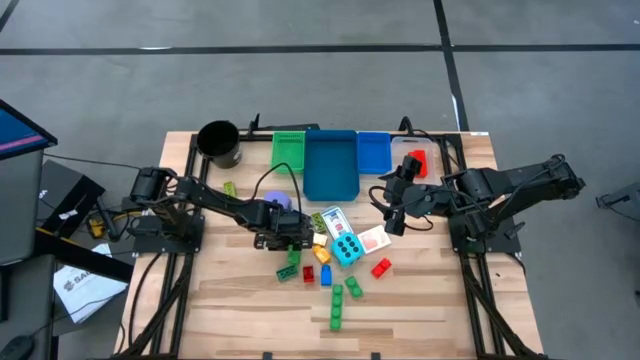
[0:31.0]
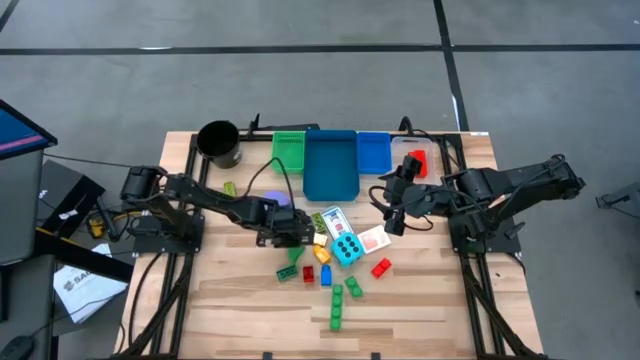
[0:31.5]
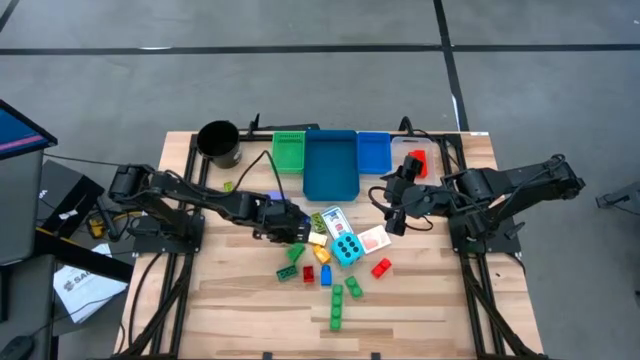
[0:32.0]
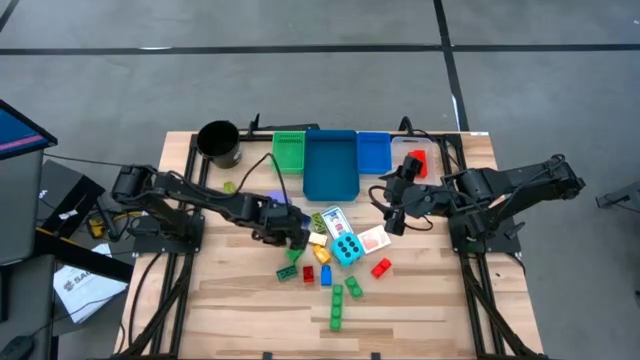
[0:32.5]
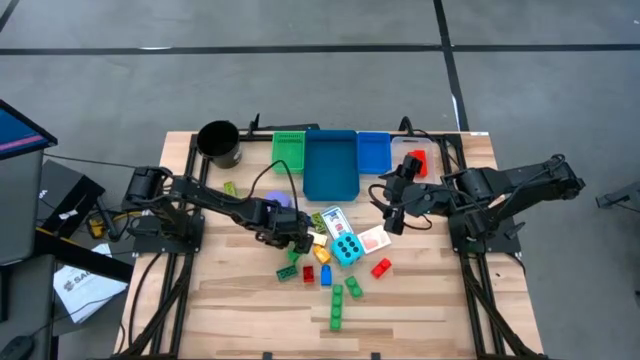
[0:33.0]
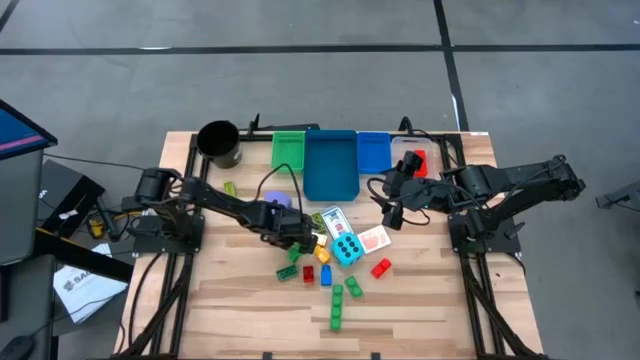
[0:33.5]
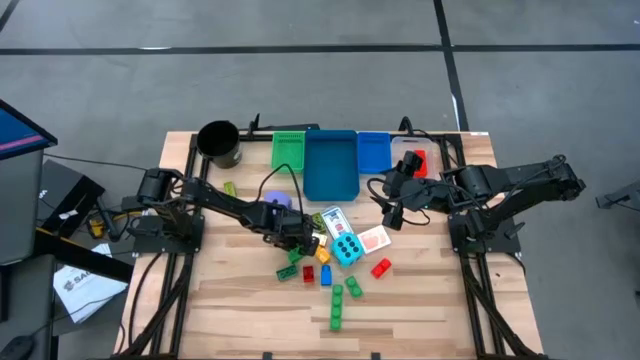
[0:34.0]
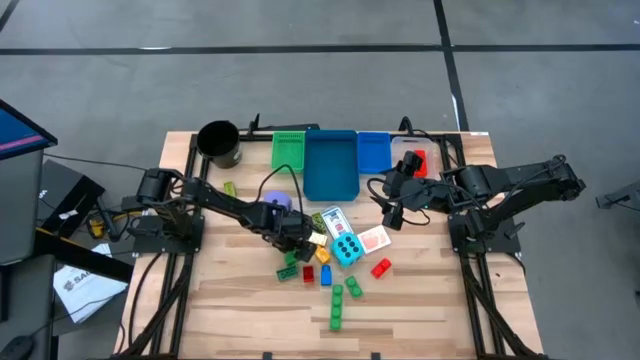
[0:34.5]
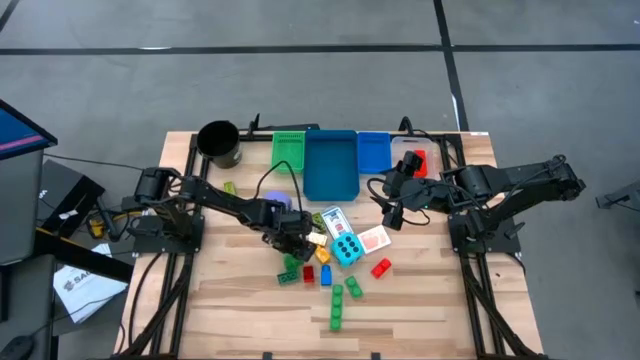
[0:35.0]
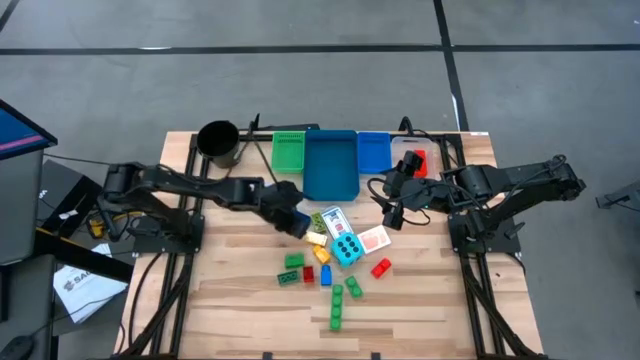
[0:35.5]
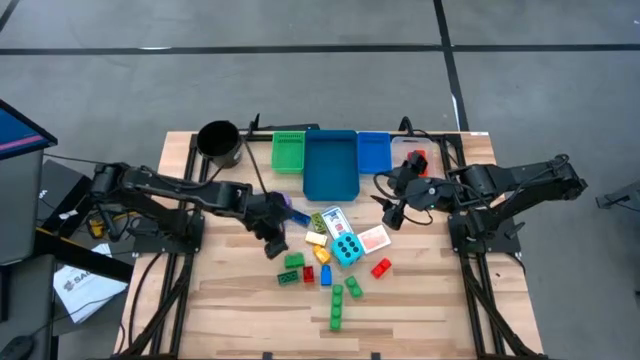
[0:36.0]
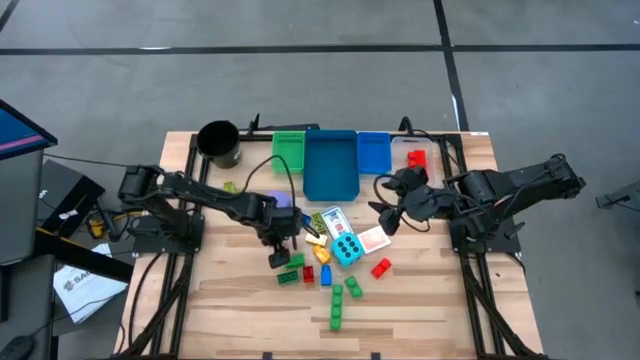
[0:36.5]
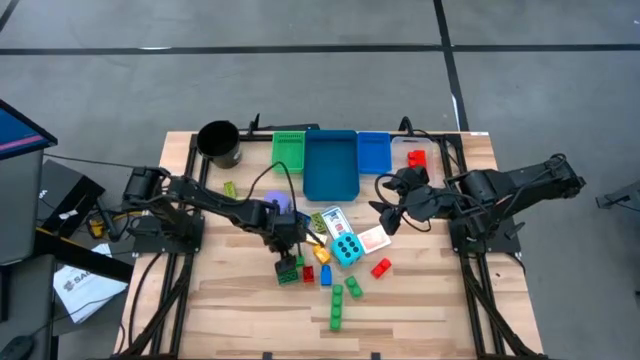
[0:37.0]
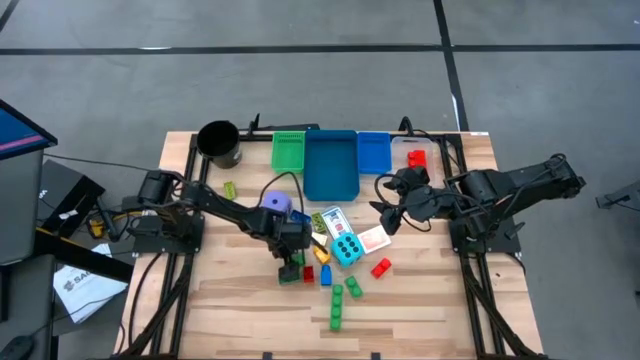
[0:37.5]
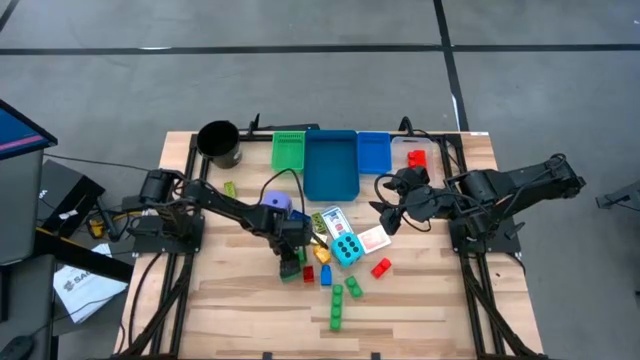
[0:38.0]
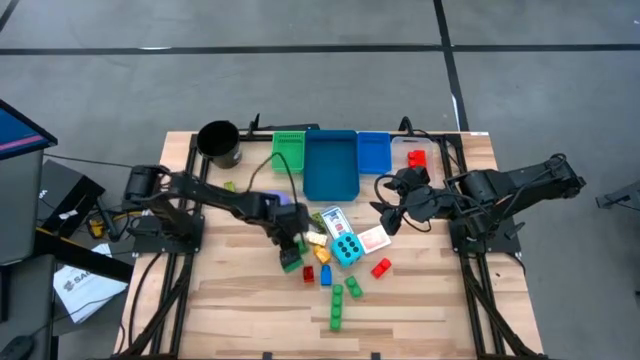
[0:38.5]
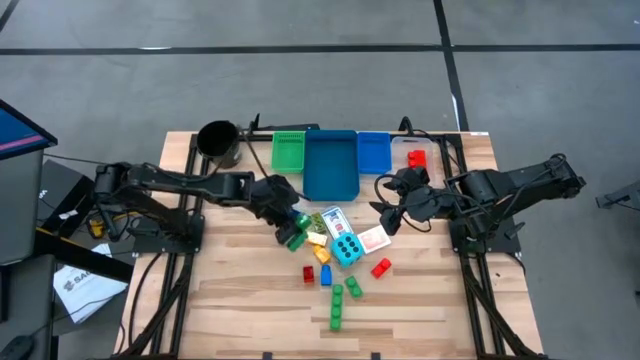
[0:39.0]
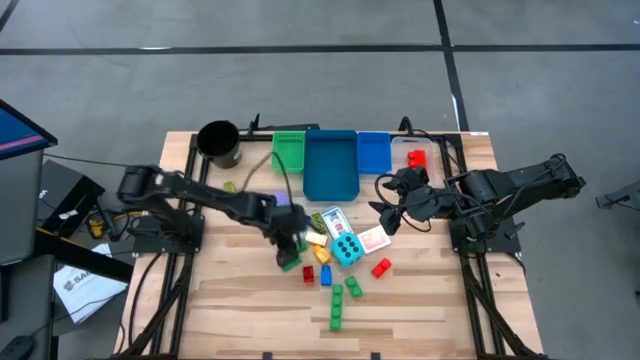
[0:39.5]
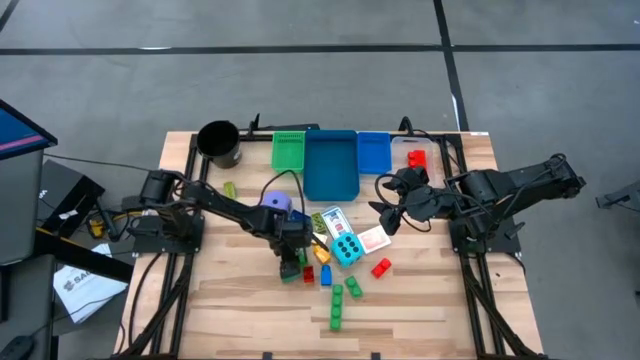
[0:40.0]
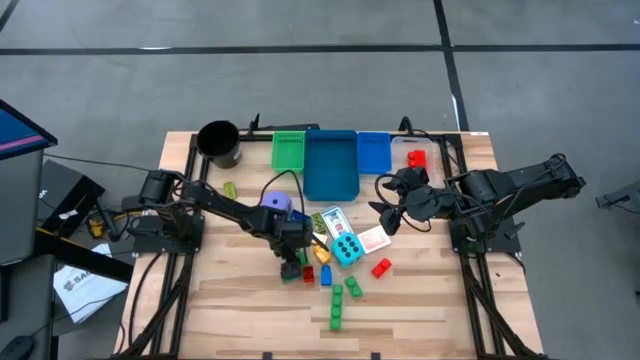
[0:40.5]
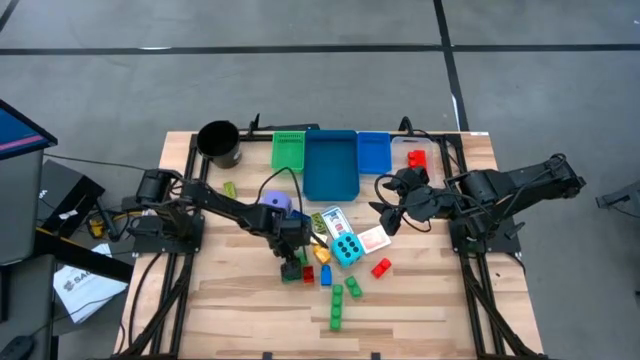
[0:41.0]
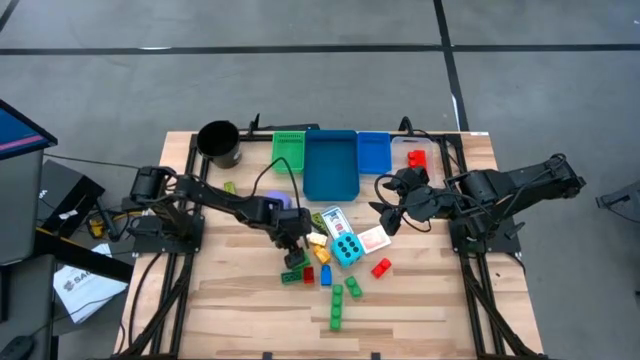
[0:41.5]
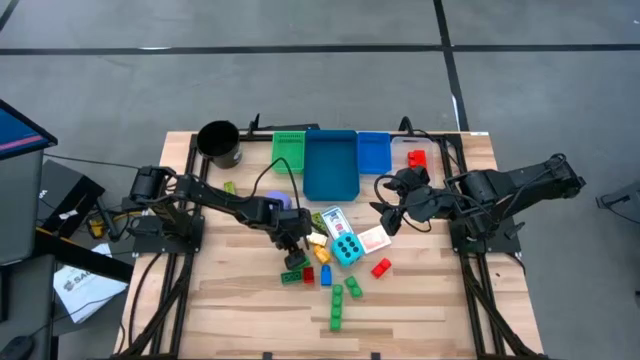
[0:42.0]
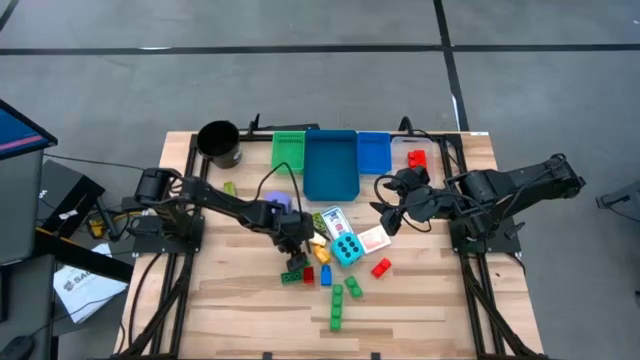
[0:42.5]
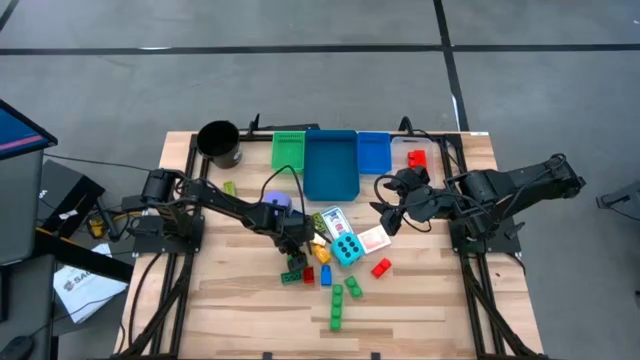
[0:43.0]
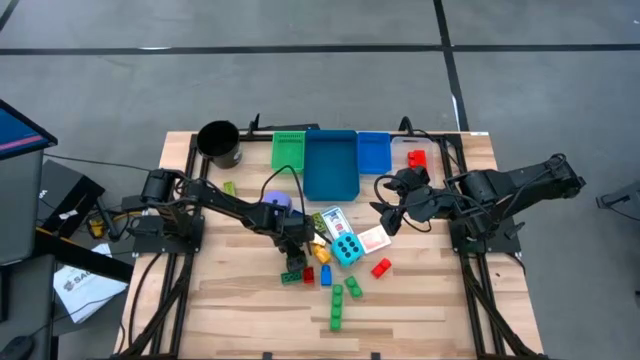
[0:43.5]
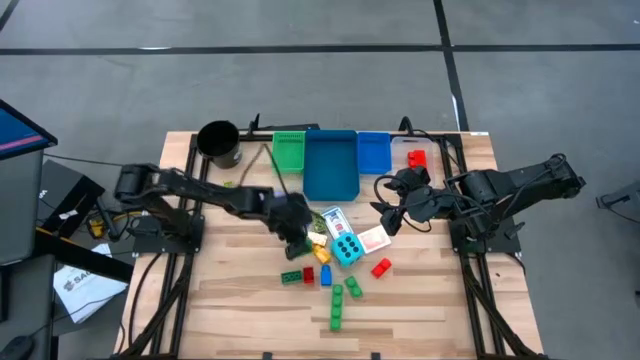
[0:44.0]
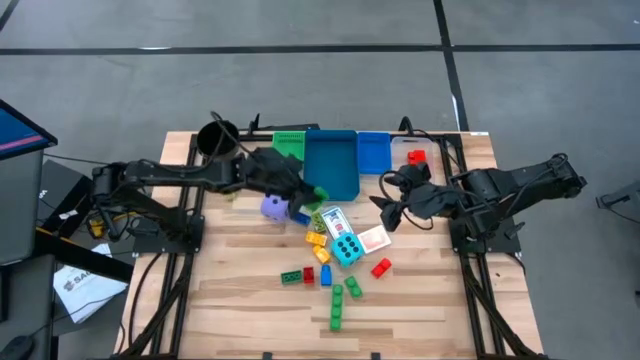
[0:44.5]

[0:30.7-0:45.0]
Task: Pick & Place Toys
Put the large green game piece into the transparent bin

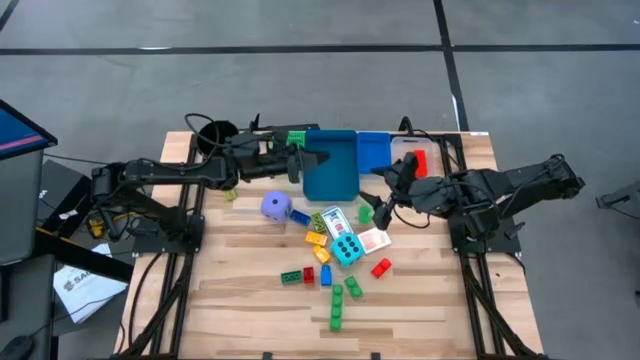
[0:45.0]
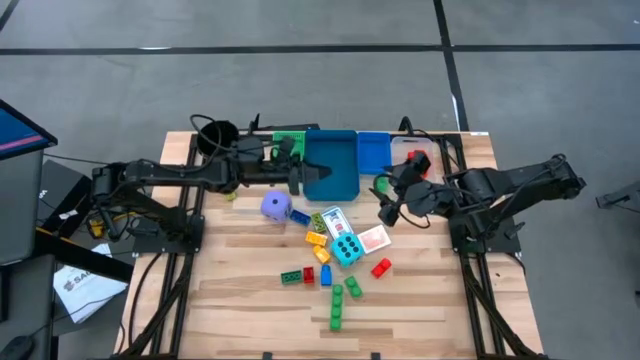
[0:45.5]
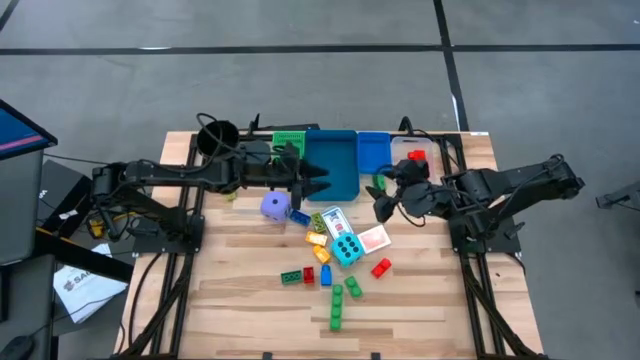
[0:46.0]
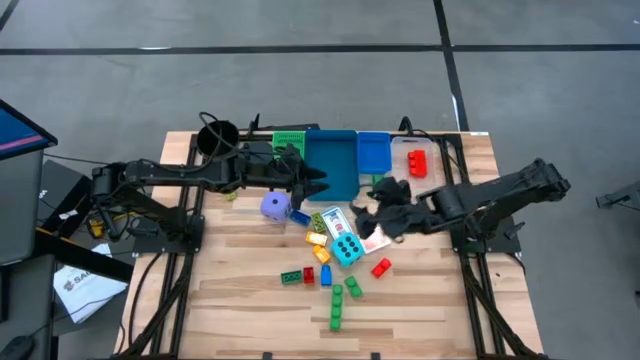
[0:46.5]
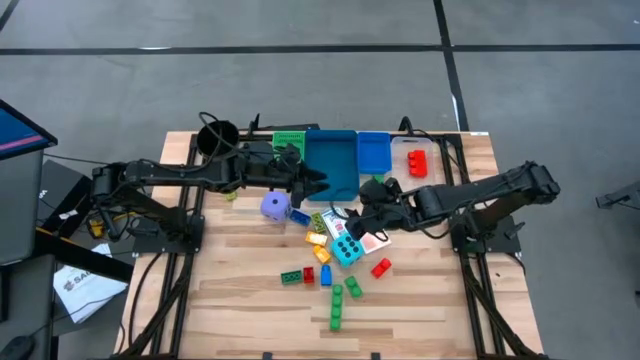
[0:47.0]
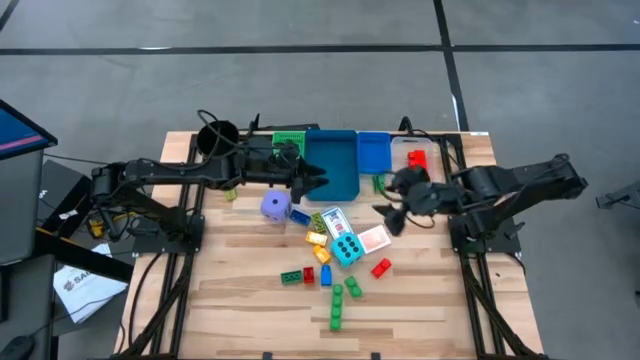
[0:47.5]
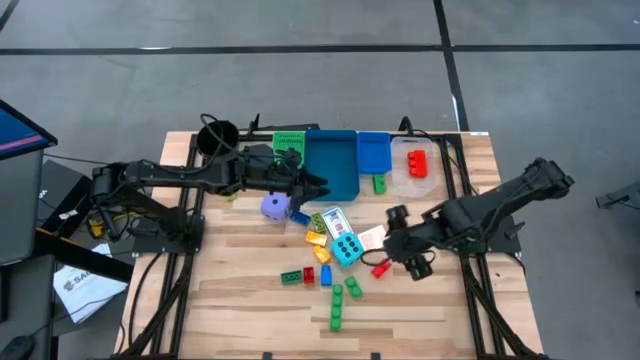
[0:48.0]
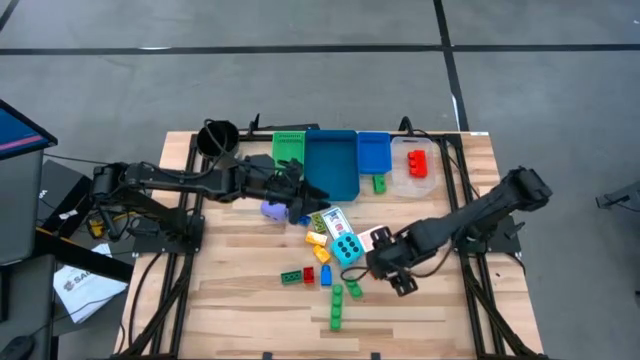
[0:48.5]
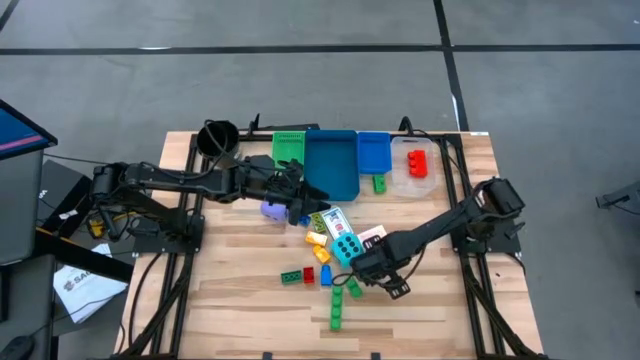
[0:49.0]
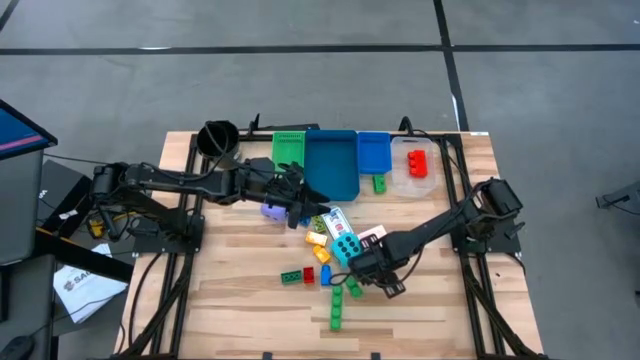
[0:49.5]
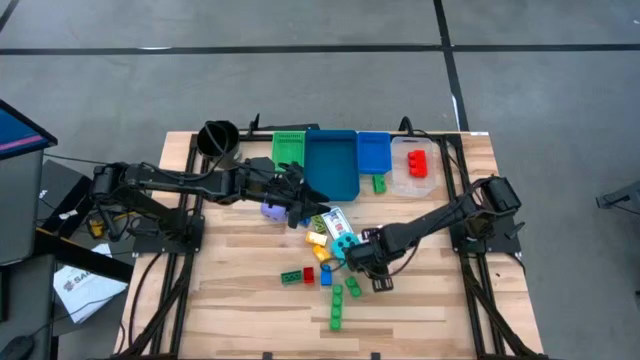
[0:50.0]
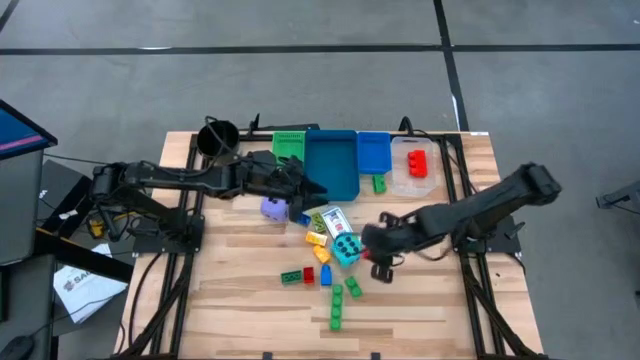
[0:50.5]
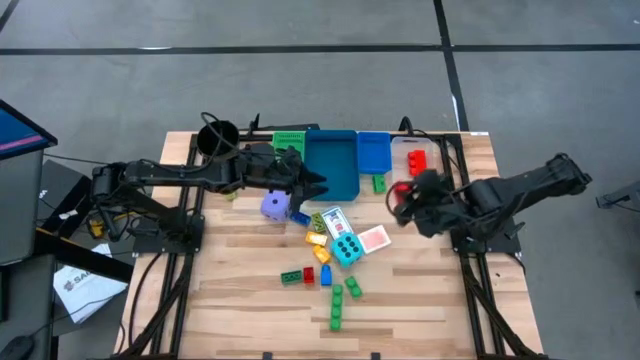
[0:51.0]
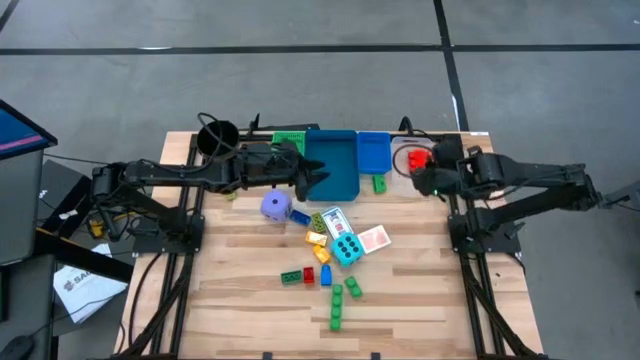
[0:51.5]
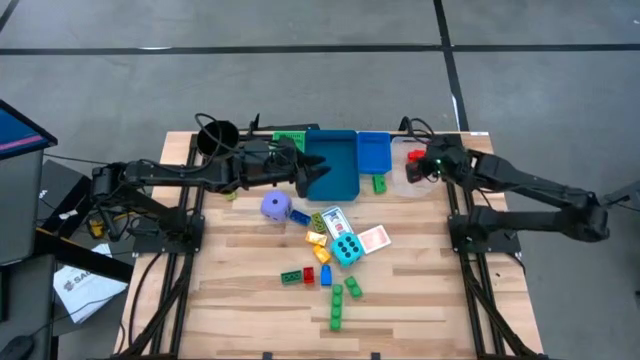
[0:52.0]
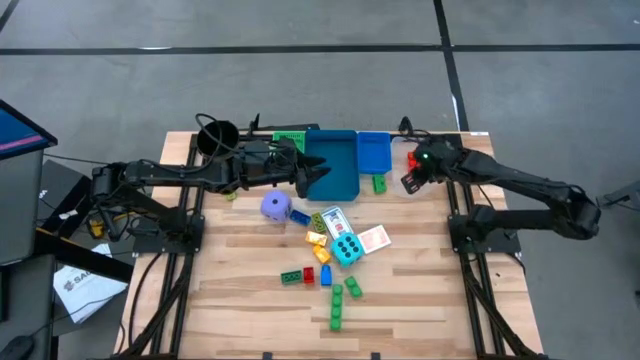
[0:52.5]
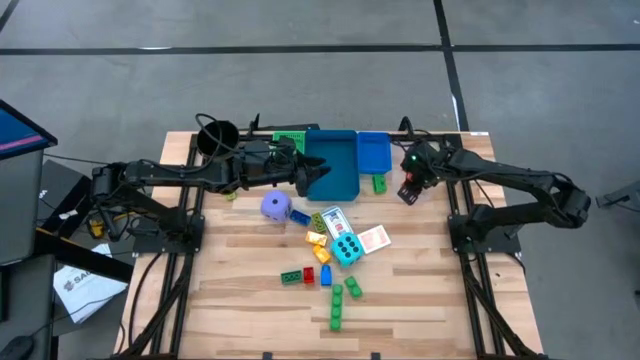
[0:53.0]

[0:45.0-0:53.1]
Put the large red game piece into the transparent bin
